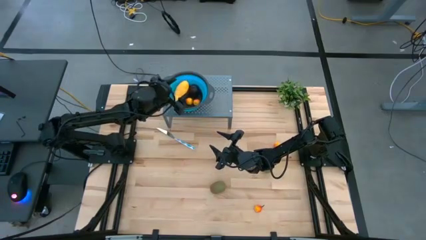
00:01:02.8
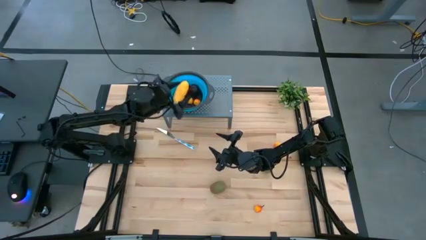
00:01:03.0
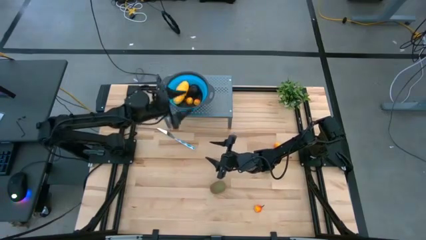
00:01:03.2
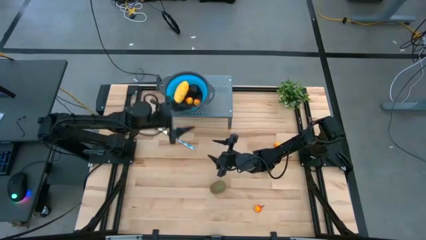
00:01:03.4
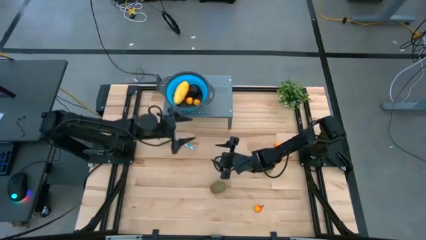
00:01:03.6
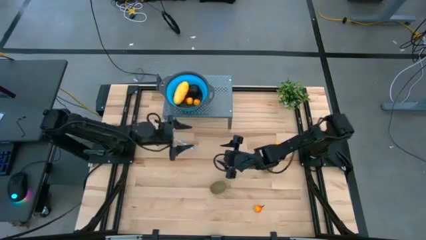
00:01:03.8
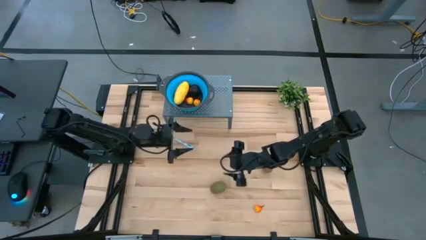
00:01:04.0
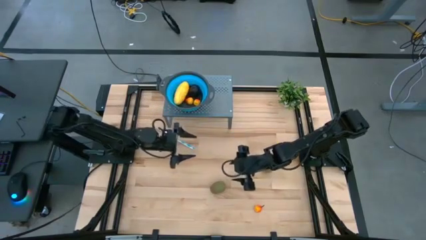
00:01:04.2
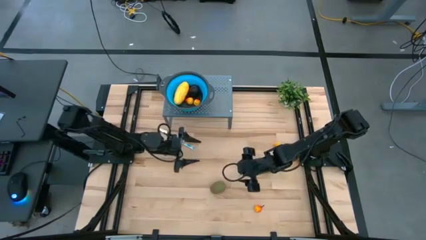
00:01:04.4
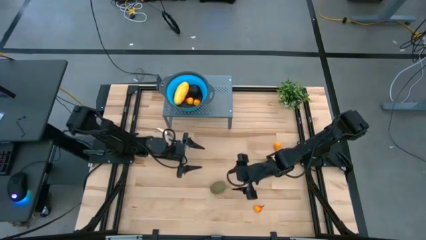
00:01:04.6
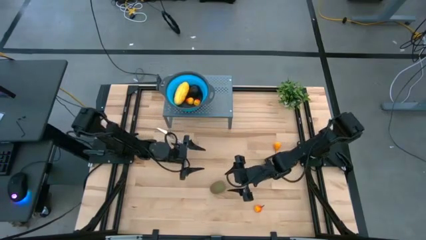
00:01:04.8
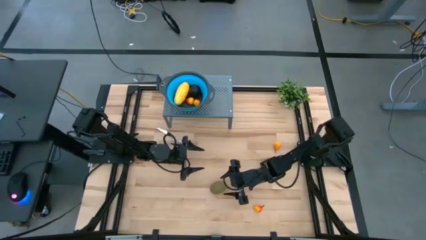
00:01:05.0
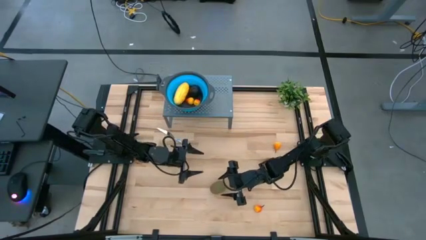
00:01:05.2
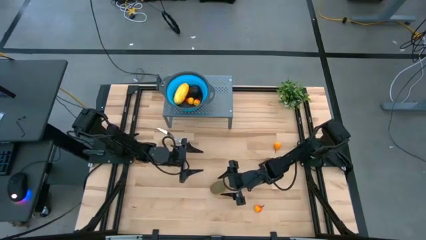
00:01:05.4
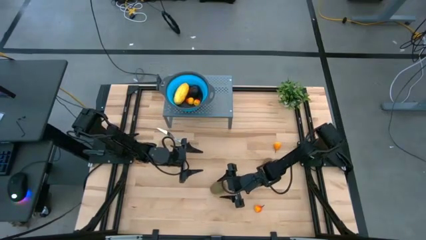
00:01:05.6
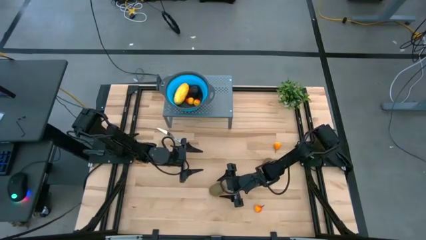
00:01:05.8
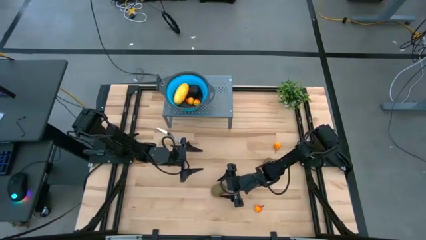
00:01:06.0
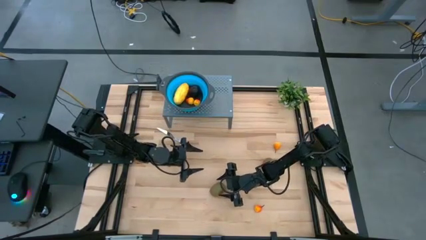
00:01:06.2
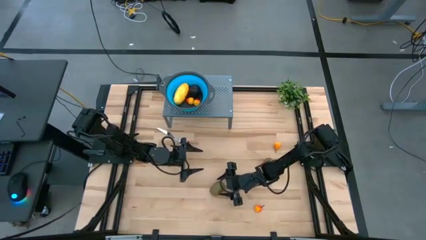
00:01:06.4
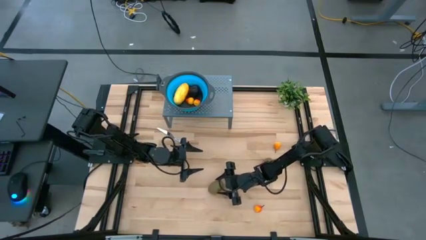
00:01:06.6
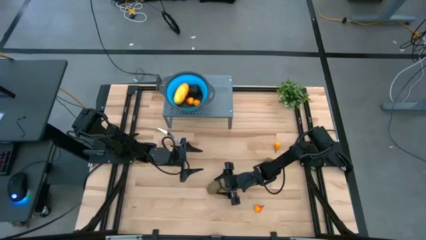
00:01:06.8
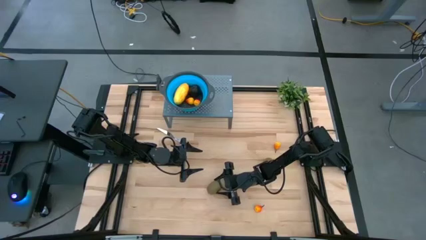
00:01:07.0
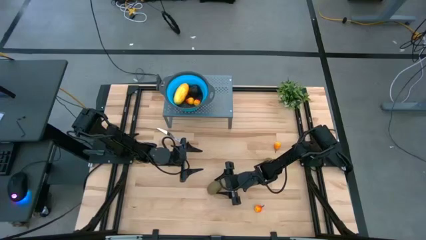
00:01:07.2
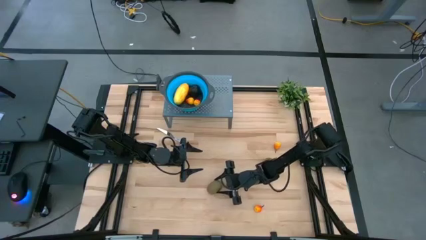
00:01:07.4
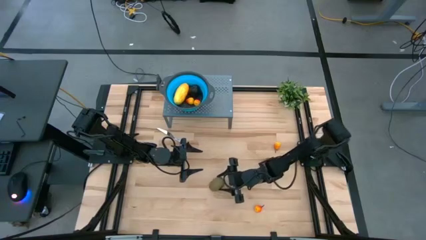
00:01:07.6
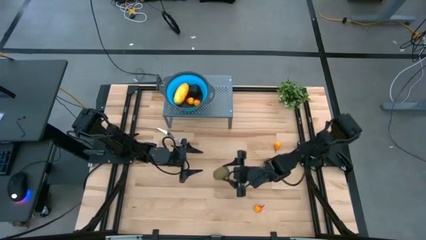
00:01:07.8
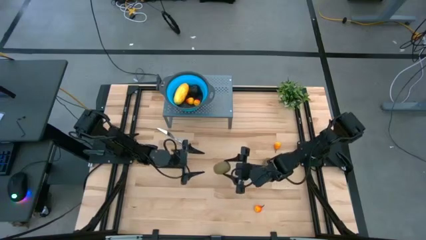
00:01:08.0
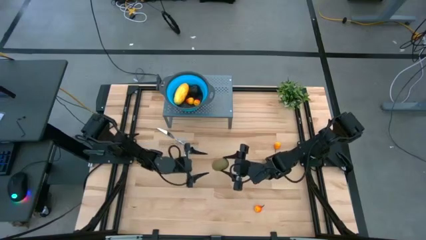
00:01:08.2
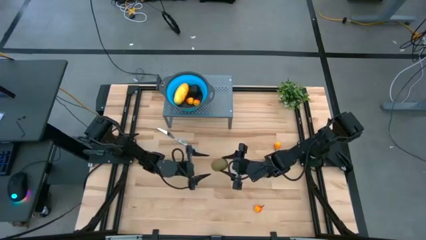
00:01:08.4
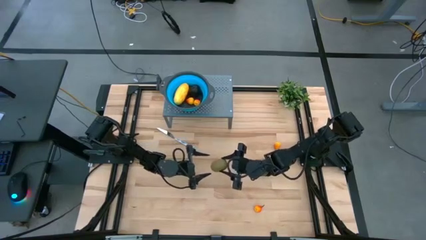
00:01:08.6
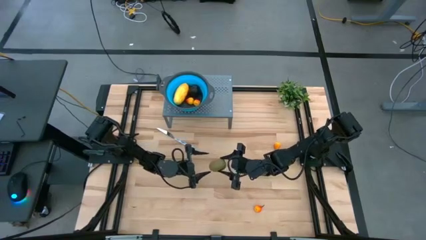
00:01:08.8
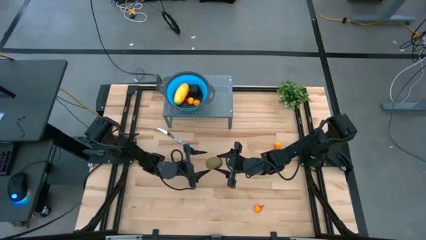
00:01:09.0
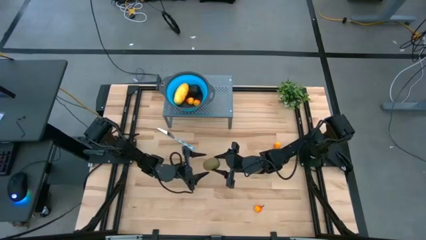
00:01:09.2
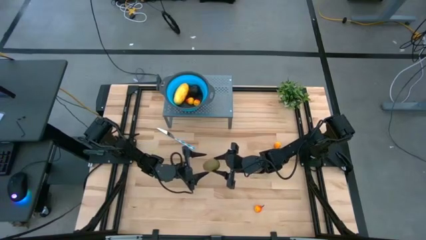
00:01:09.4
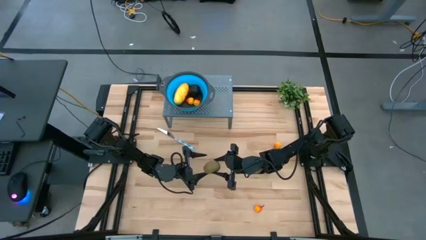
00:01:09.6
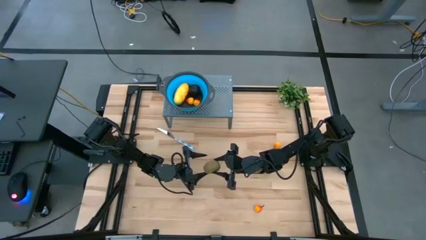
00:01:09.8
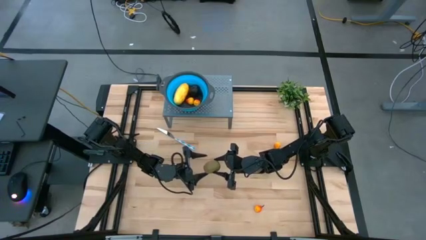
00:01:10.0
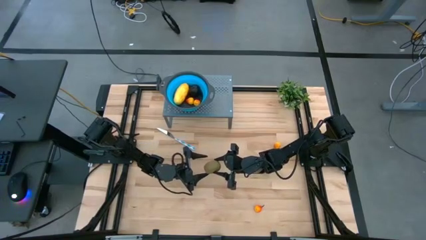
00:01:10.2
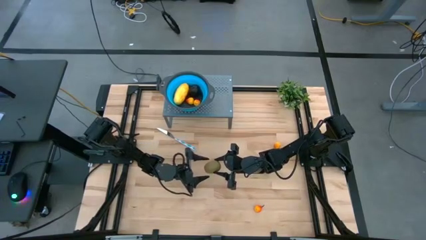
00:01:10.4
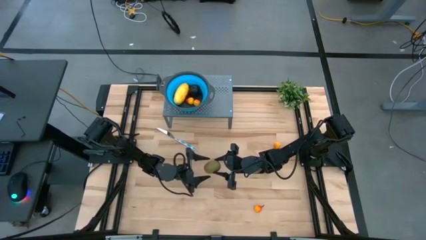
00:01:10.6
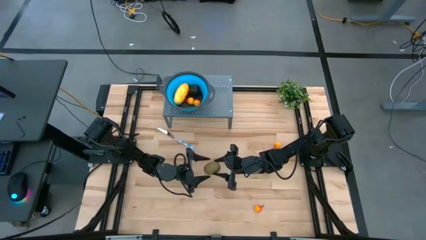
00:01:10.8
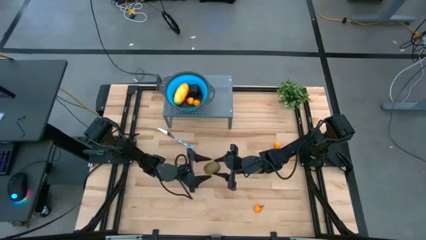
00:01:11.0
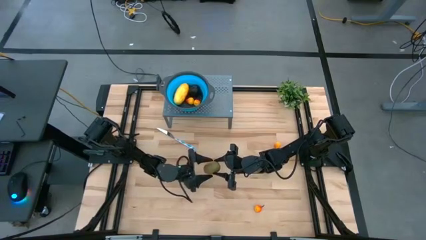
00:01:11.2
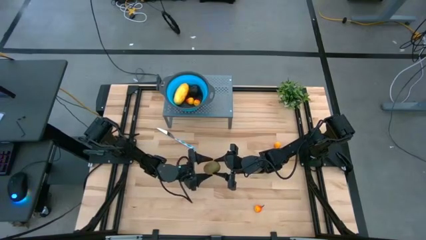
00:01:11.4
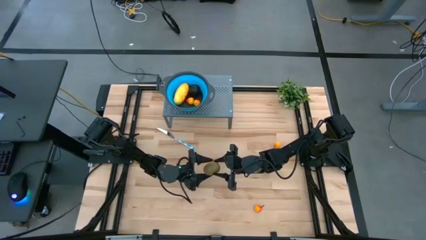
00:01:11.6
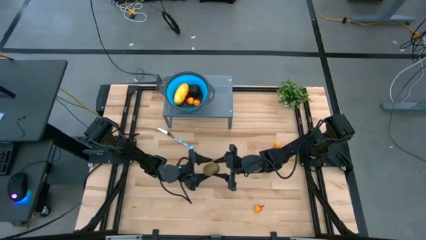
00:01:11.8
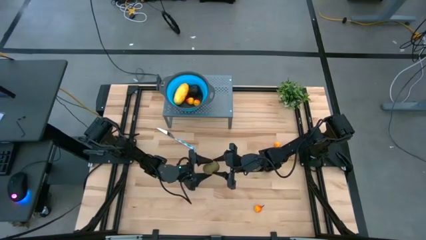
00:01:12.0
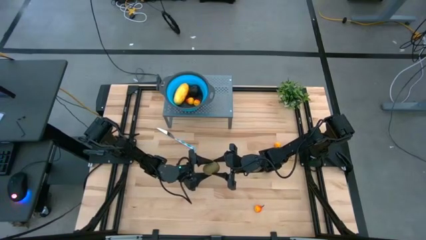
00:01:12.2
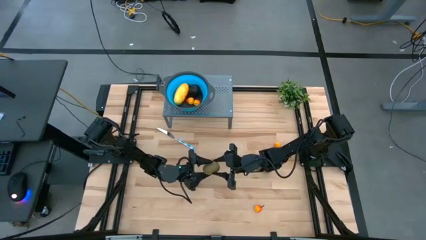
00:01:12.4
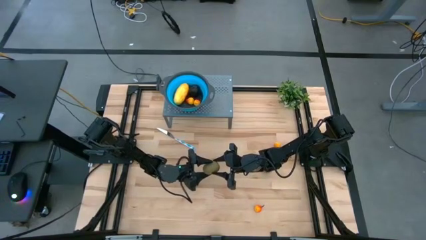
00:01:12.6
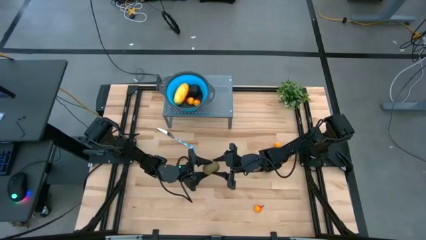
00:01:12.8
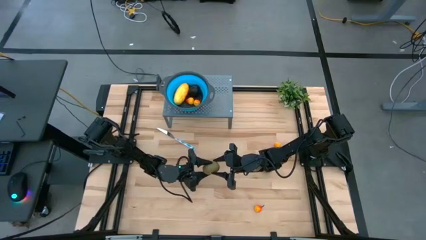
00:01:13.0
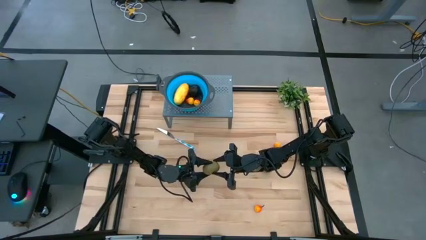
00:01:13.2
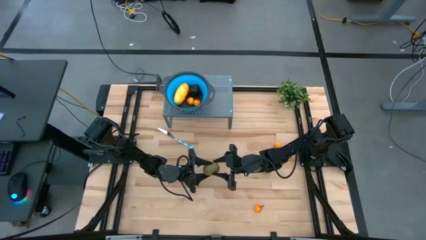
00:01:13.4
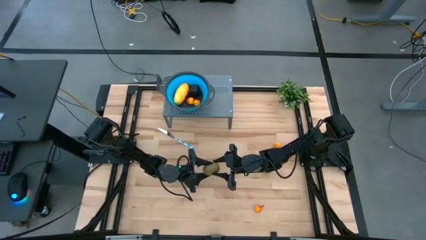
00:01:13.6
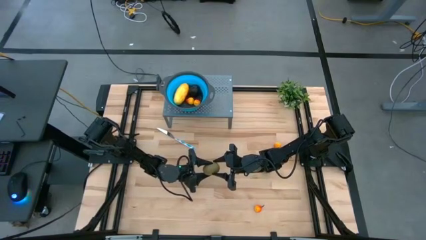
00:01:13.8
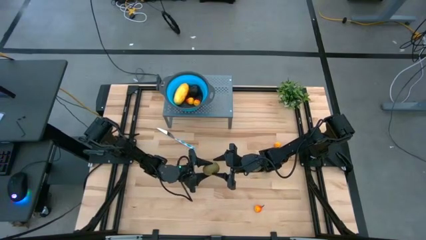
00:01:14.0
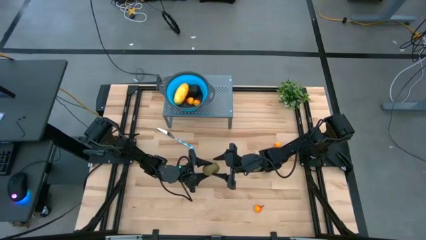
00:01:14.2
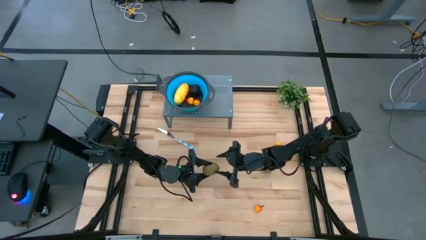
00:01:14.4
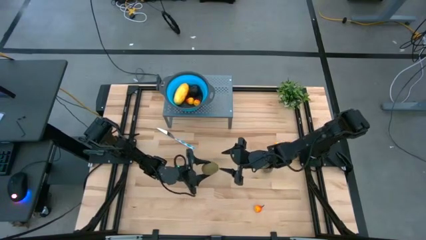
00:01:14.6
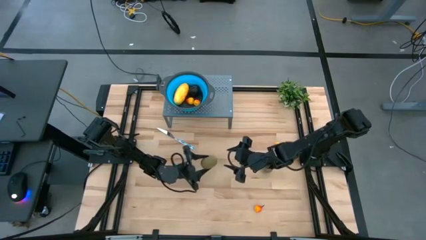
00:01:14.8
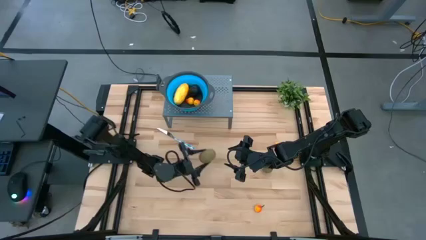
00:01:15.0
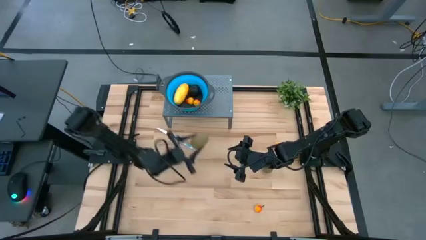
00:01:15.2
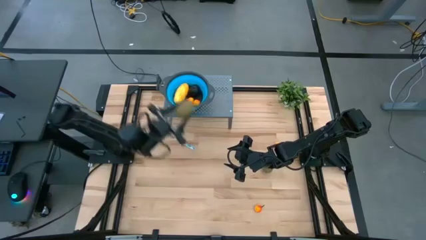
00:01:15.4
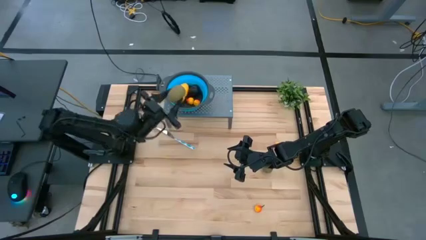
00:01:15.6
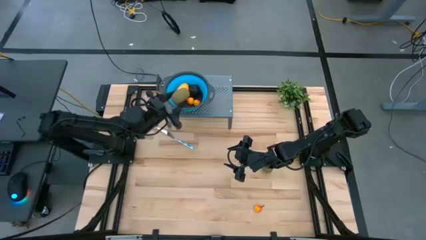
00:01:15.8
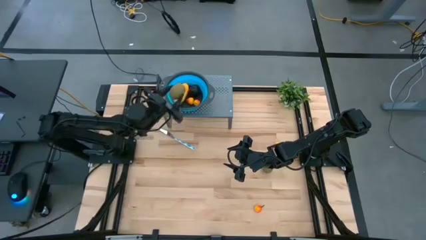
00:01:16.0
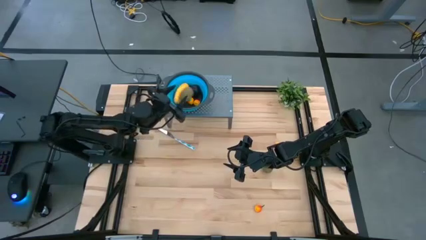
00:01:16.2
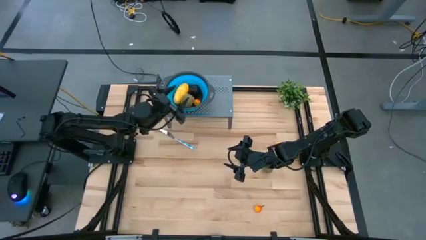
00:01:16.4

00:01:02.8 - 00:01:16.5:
Task: Pick & Place Fruit
Put the left green kiwi into the blue strainer bowl
